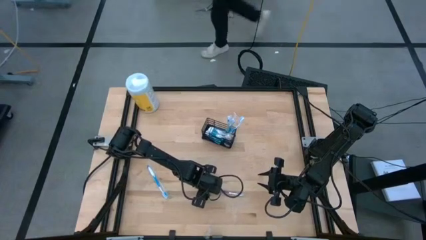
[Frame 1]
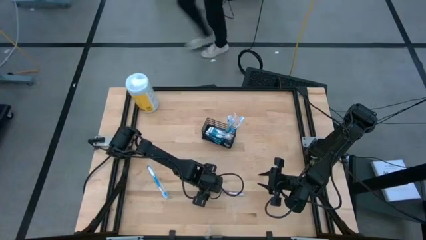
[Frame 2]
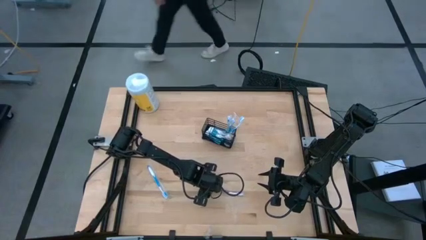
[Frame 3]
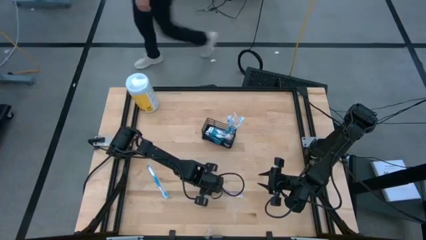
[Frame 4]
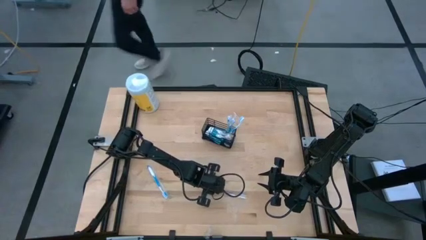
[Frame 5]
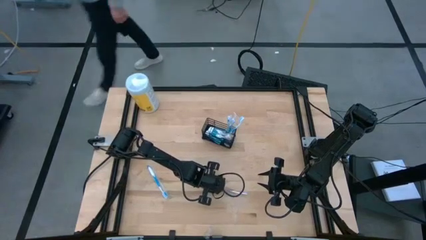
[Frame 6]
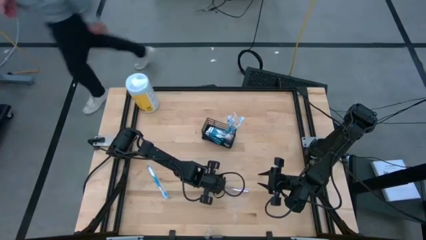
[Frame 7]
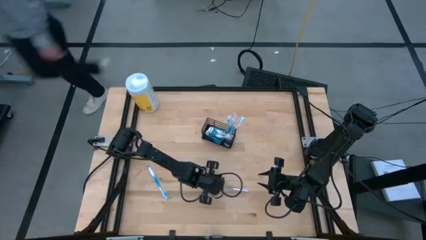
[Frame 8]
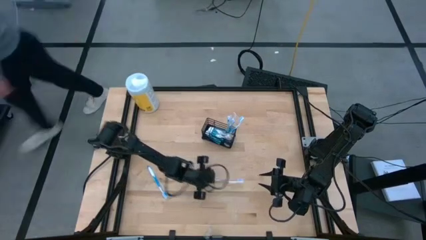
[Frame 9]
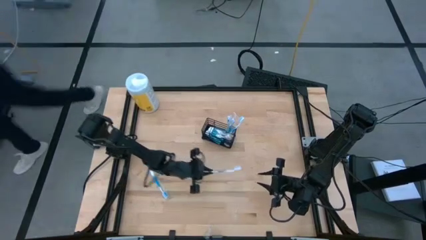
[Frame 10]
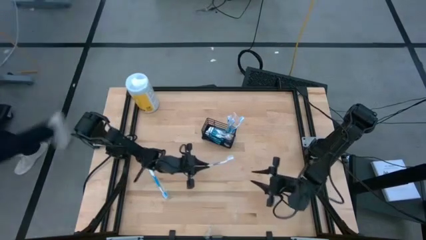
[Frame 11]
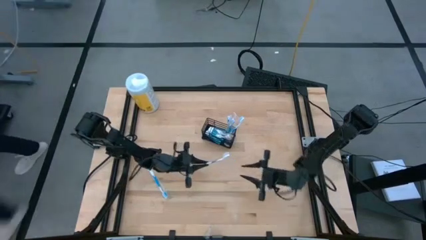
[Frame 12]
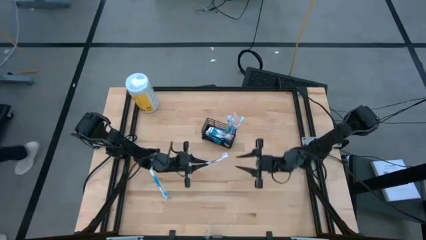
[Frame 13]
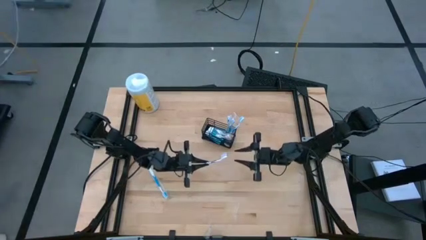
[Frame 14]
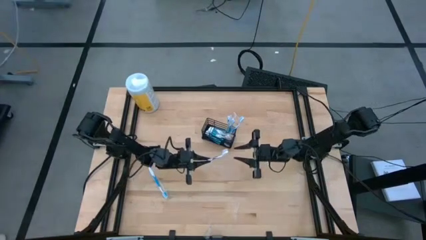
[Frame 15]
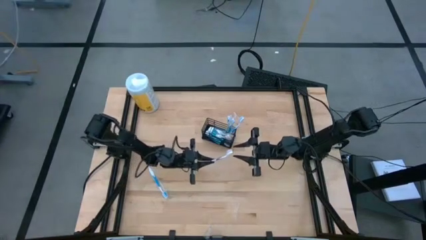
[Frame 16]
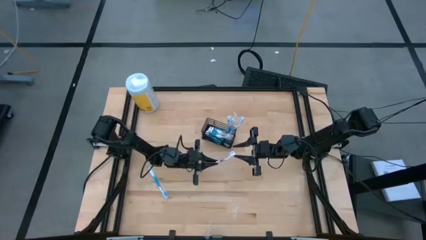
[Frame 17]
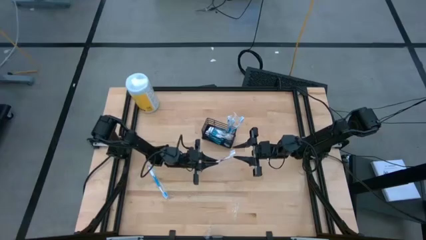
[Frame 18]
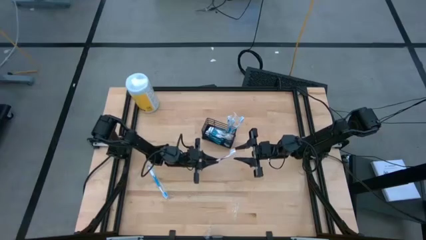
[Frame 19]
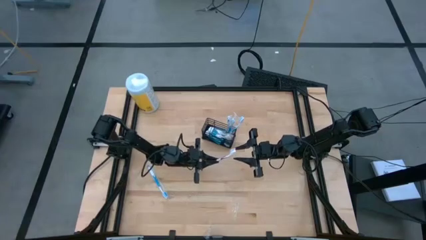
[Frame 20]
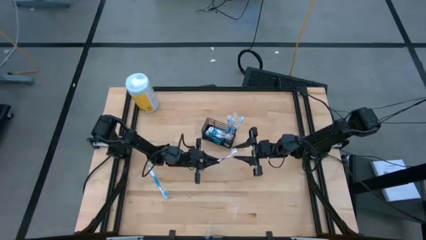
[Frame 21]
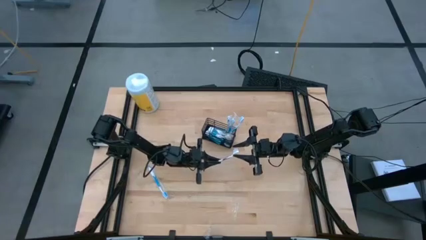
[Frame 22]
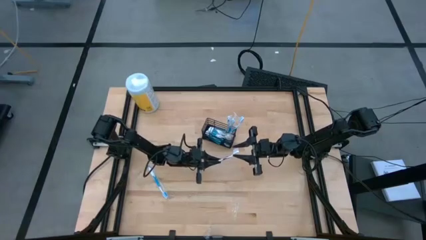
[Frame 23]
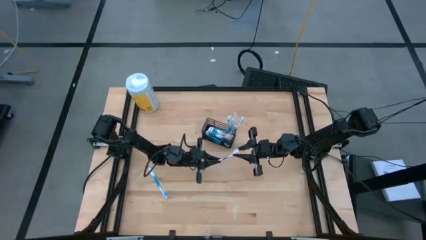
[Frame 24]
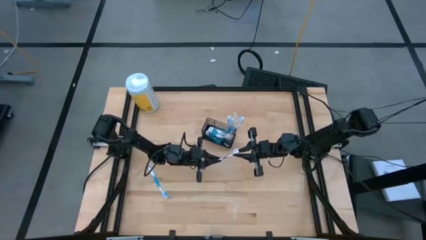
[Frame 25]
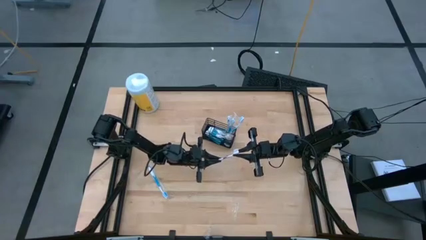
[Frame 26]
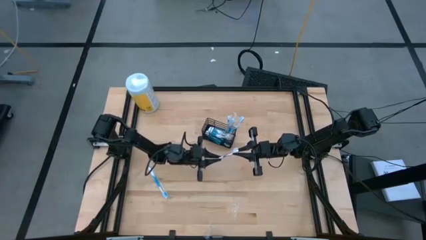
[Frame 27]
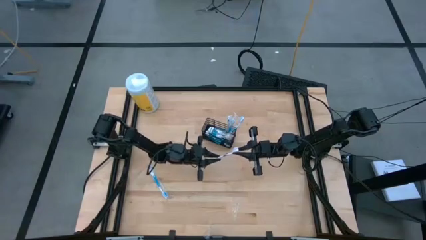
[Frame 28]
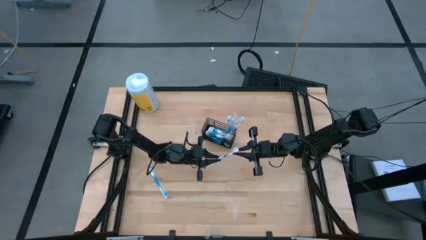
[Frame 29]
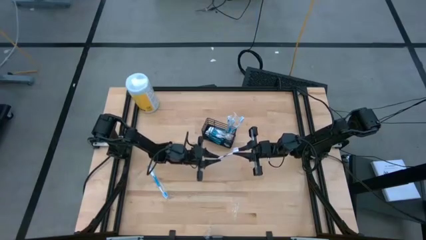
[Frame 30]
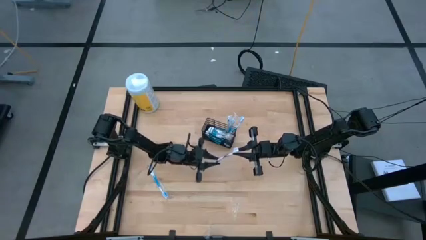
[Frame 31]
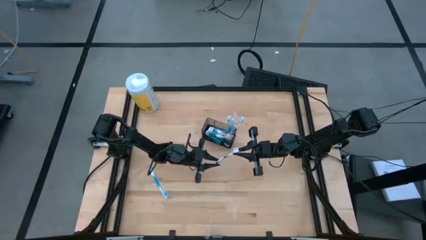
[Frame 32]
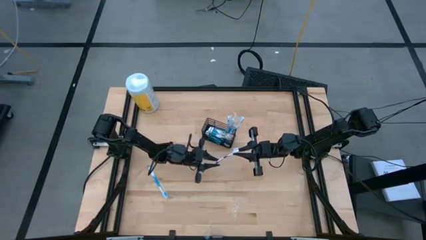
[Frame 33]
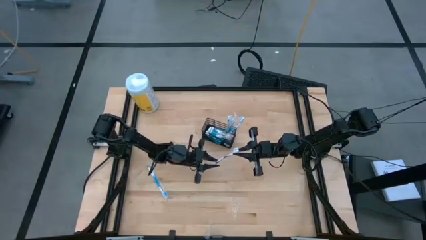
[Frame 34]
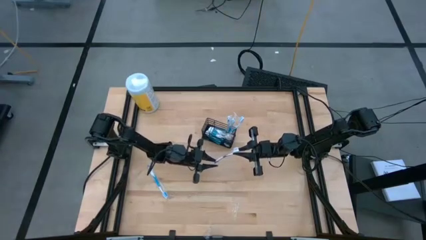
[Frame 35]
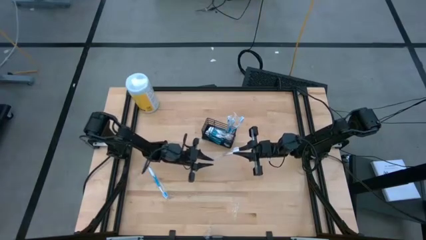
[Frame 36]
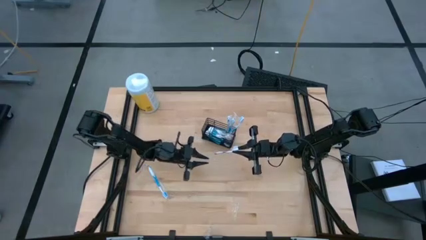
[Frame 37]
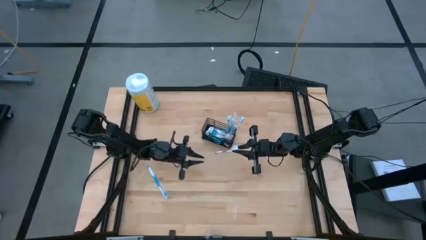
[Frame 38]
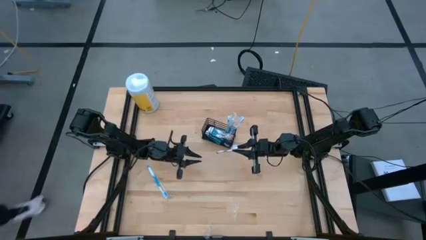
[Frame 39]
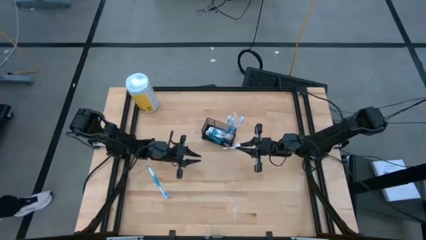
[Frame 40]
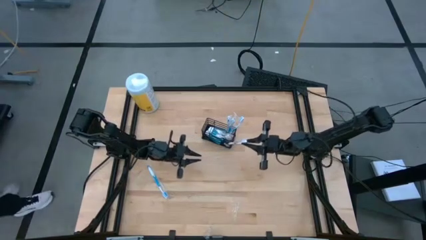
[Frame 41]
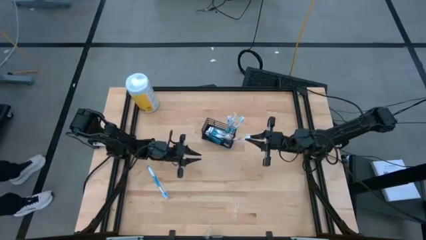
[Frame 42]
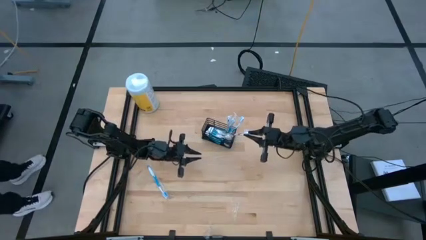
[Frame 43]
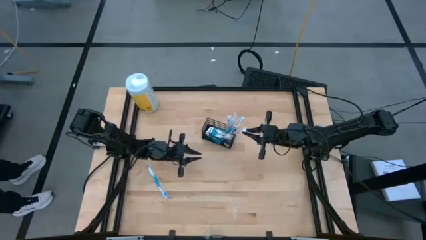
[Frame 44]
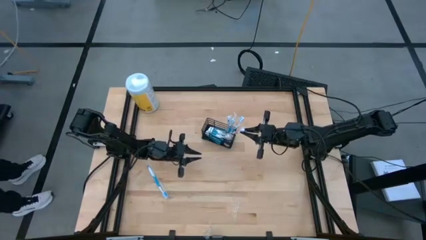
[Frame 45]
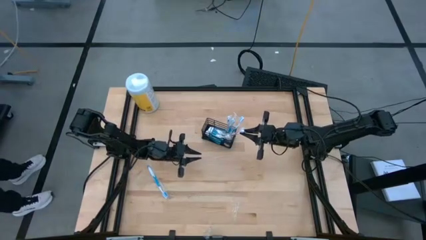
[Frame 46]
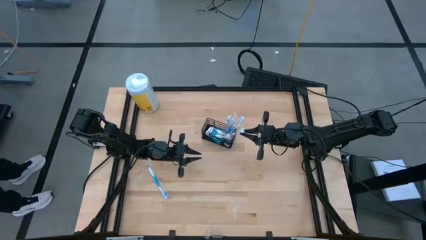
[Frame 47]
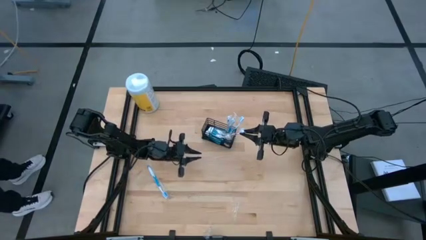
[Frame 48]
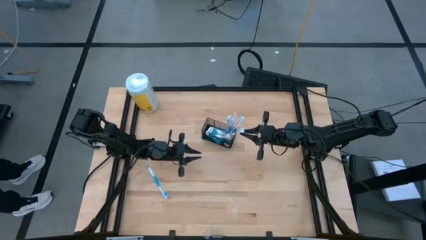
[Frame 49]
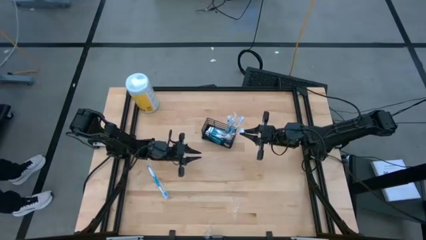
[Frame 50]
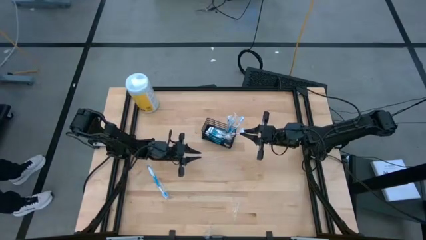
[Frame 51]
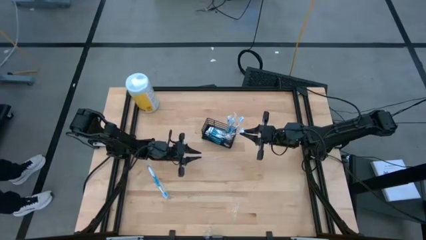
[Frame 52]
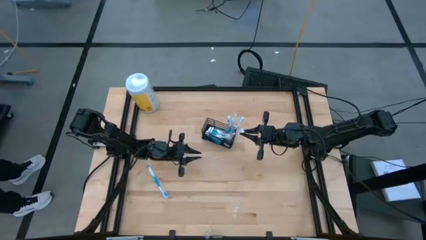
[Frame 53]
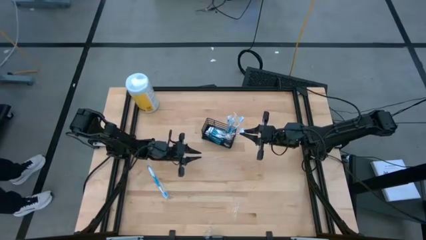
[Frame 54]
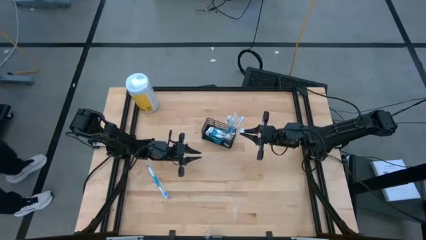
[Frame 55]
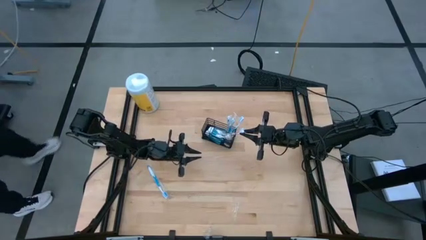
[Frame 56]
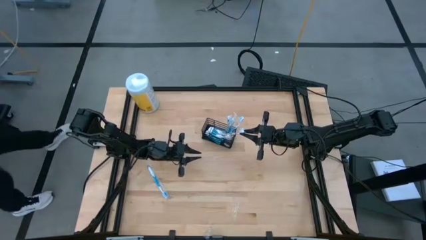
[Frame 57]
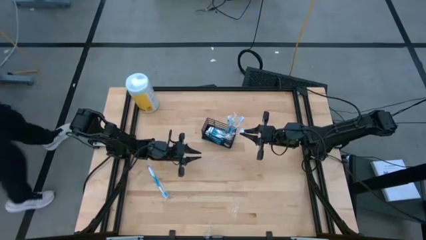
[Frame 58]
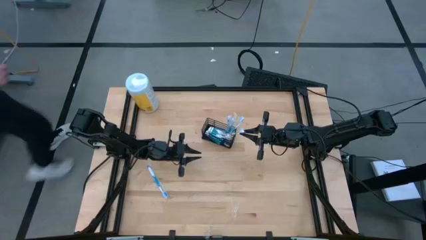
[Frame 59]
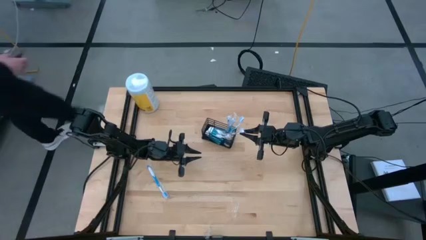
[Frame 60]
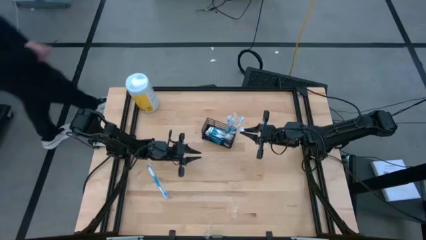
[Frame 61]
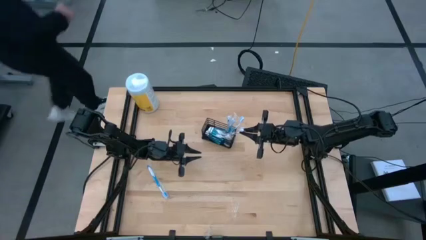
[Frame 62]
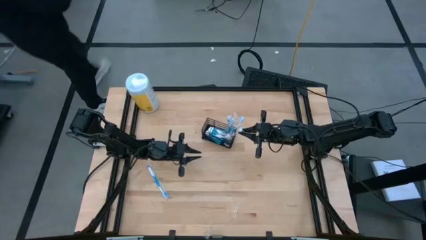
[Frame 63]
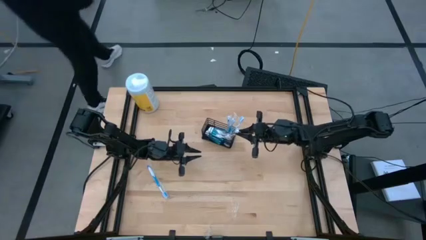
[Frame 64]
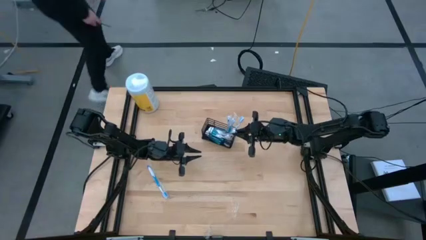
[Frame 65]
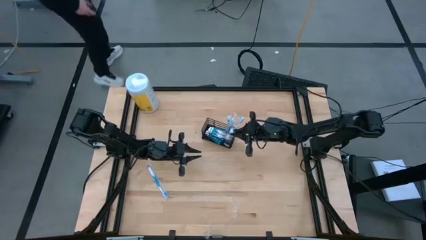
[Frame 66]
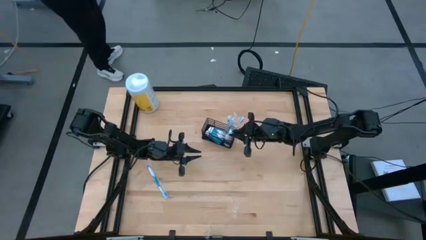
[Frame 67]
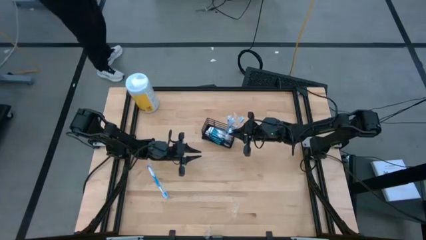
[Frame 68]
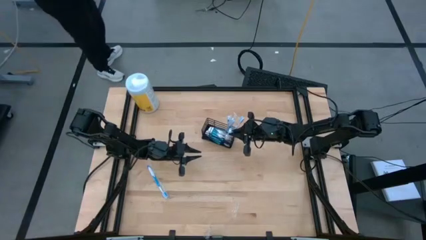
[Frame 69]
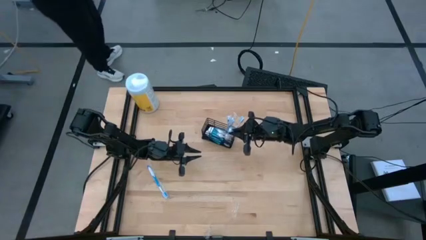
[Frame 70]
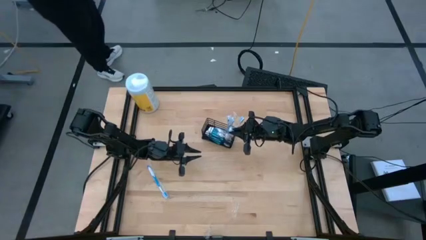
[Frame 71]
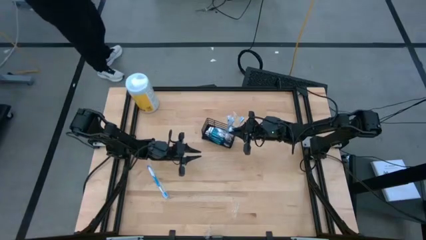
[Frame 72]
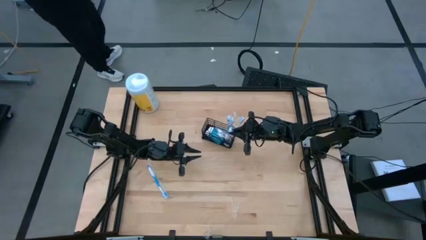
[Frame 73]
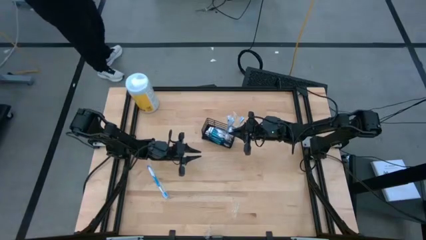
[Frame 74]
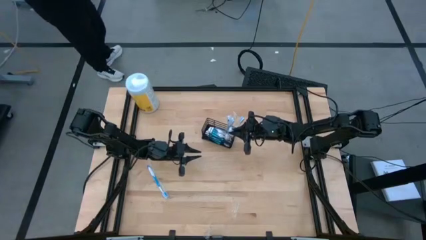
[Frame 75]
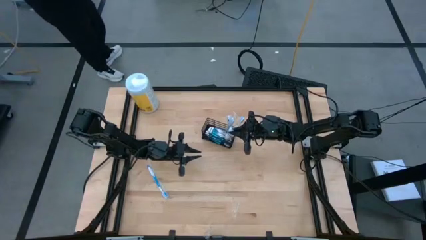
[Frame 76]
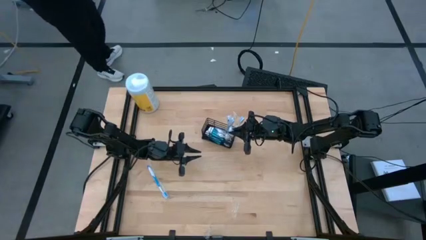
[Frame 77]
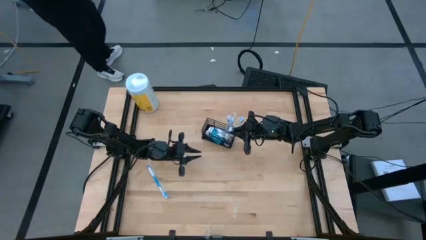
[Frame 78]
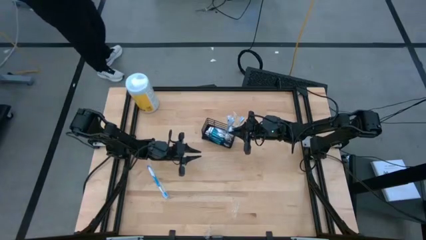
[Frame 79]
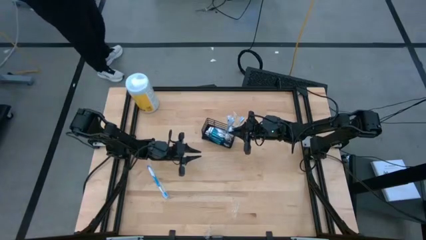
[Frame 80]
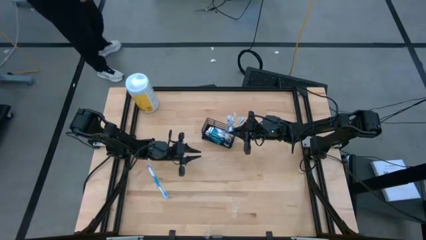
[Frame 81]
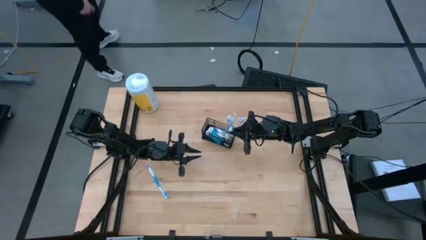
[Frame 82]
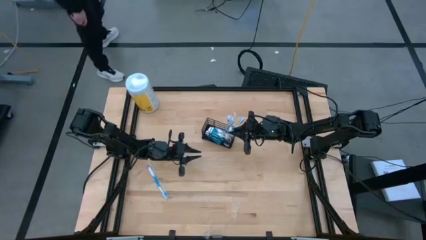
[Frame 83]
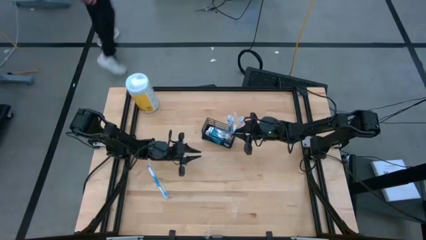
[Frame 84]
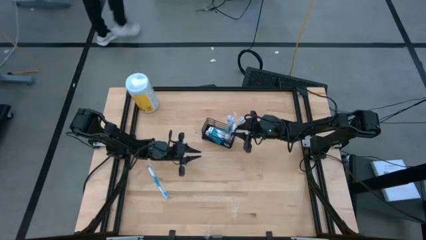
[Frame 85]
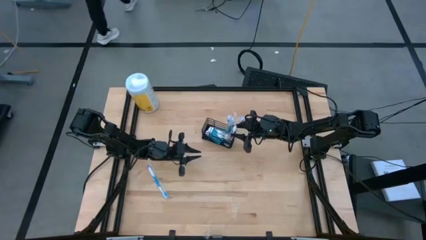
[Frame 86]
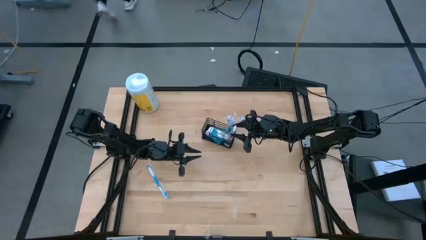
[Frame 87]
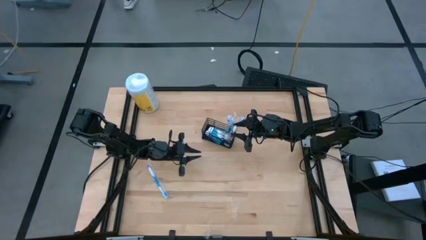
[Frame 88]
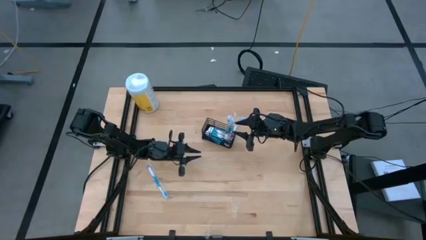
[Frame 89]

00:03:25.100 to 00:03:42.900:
Task: Pick & Place toothbrushing station
Put the purple toothbrush into the wire organizer
